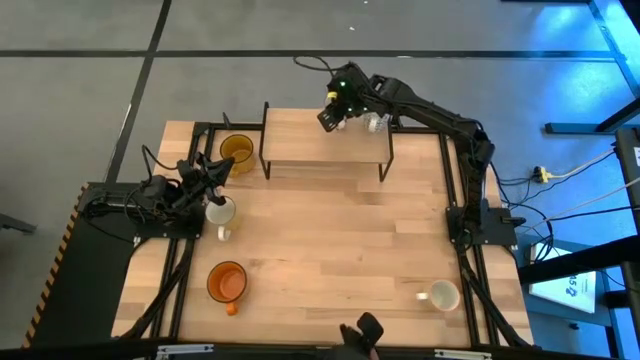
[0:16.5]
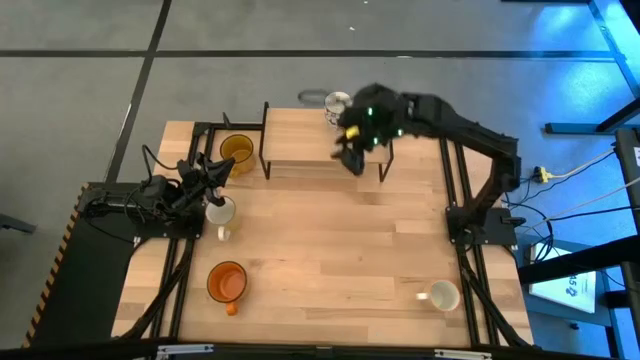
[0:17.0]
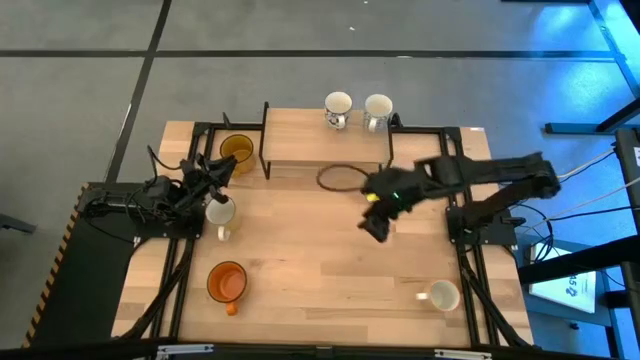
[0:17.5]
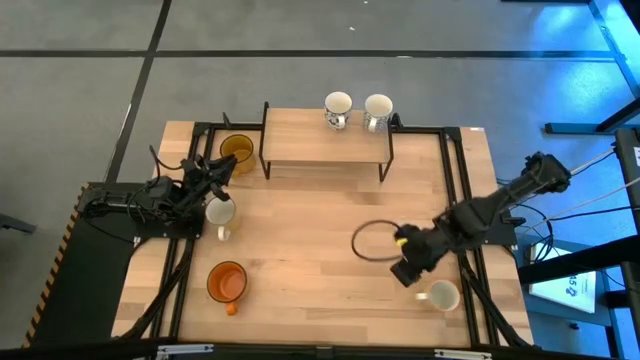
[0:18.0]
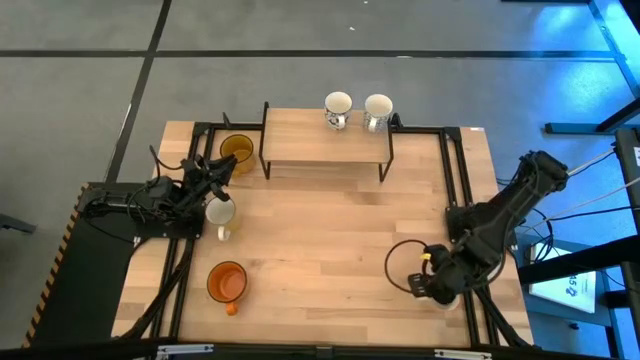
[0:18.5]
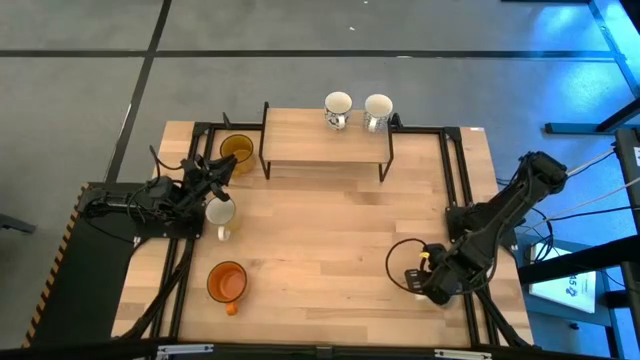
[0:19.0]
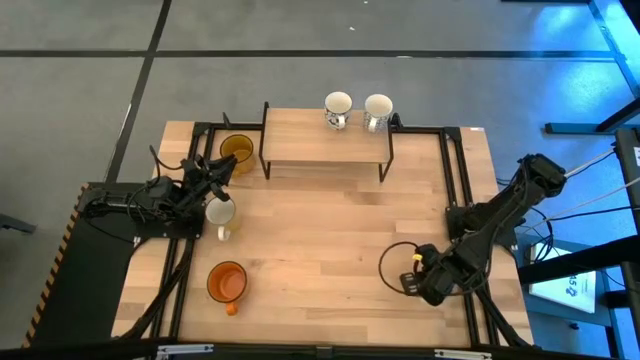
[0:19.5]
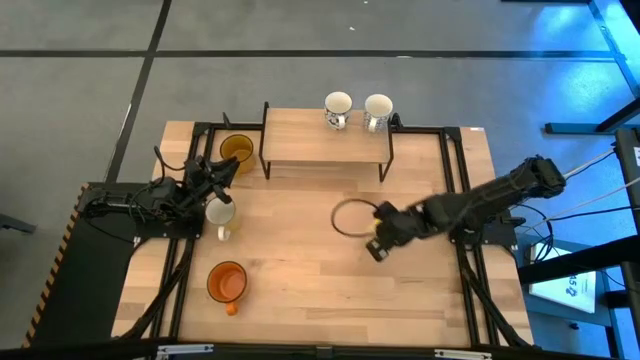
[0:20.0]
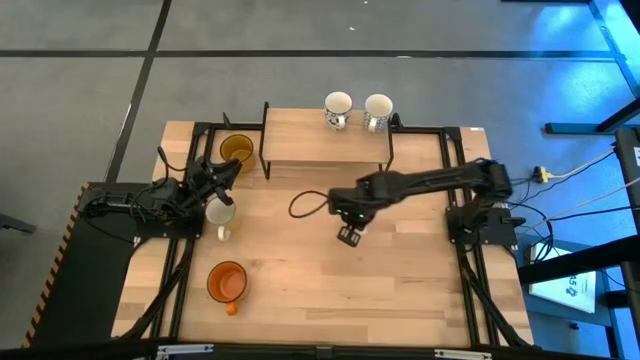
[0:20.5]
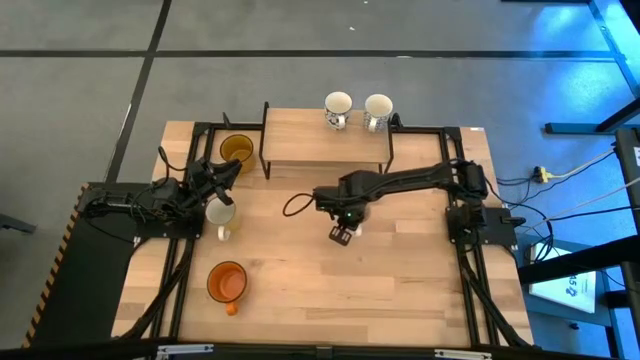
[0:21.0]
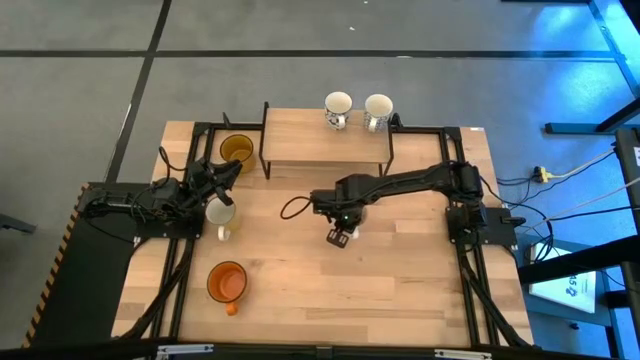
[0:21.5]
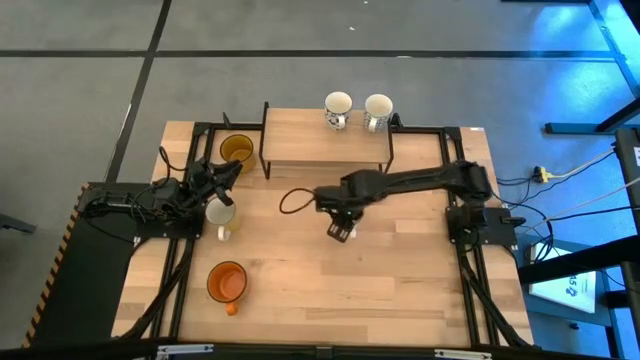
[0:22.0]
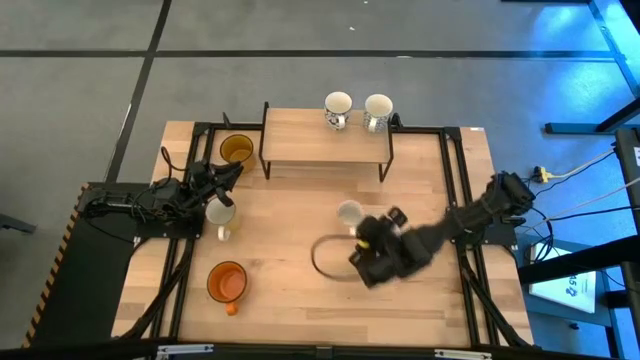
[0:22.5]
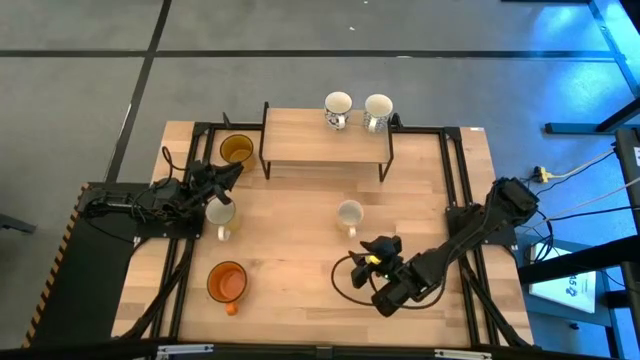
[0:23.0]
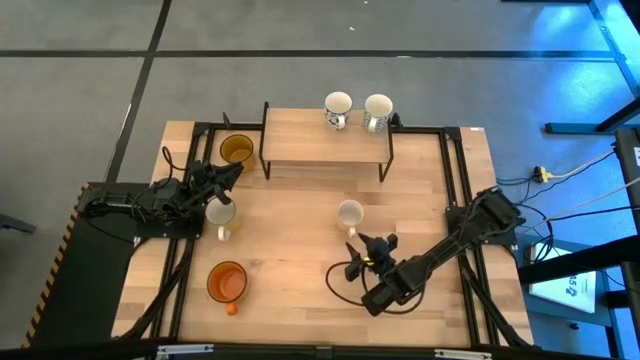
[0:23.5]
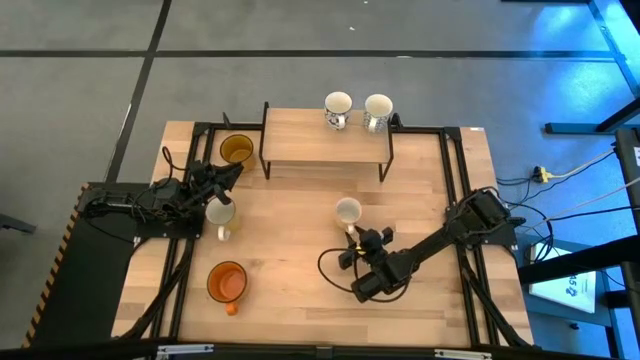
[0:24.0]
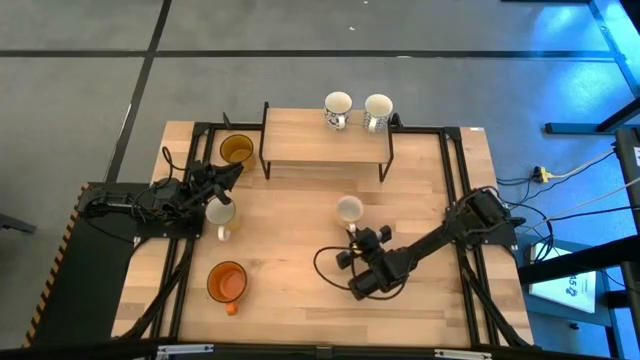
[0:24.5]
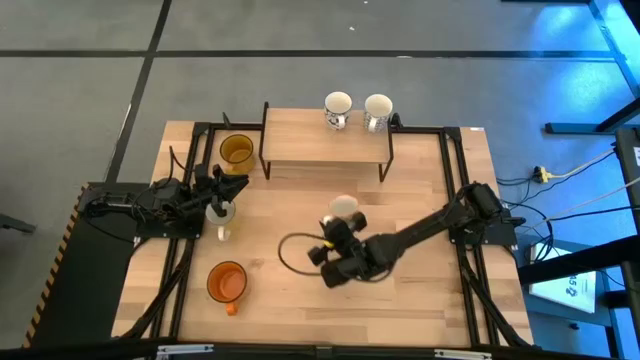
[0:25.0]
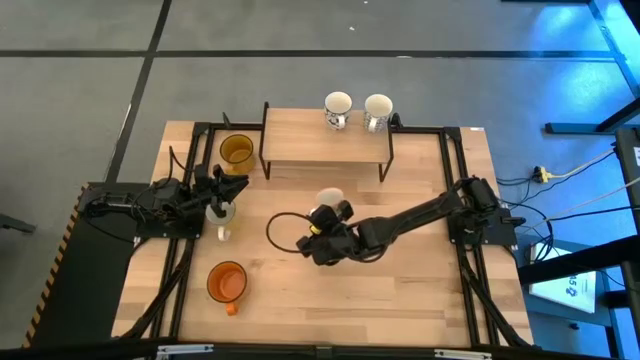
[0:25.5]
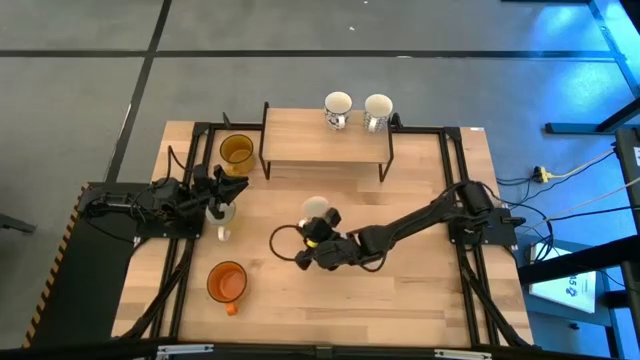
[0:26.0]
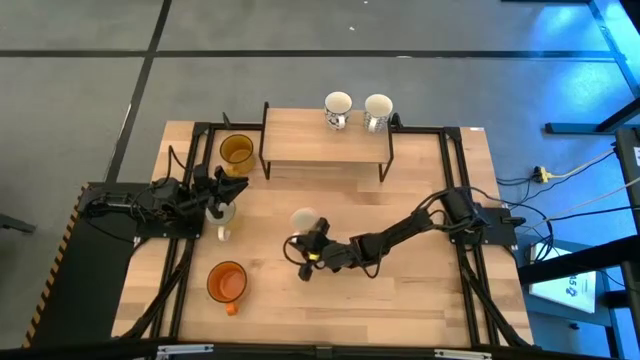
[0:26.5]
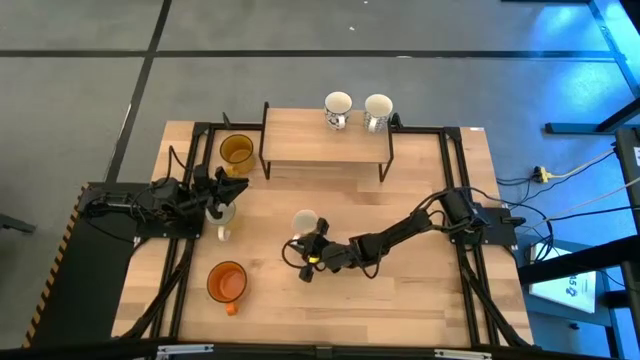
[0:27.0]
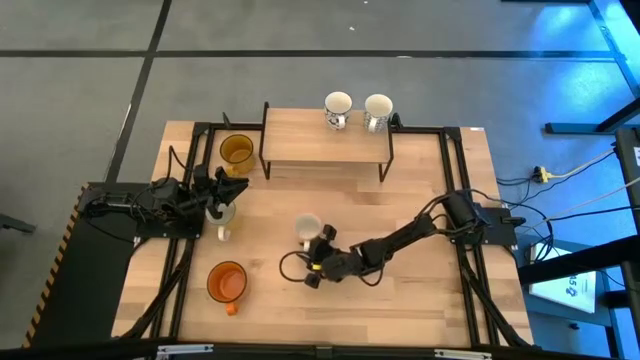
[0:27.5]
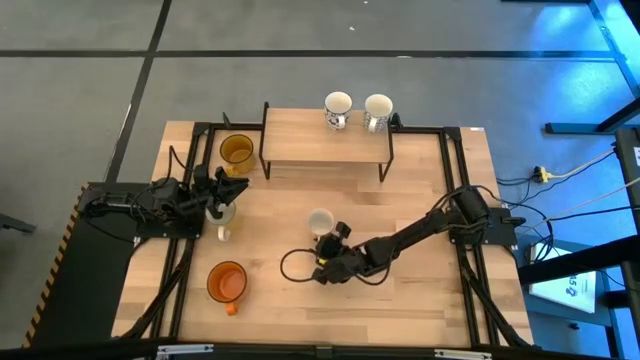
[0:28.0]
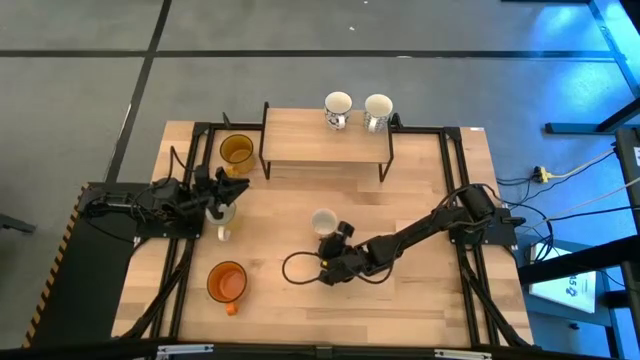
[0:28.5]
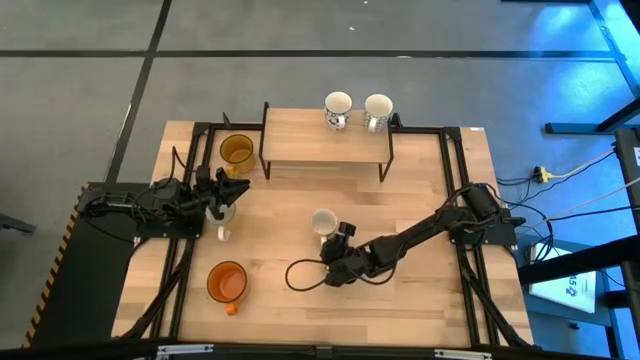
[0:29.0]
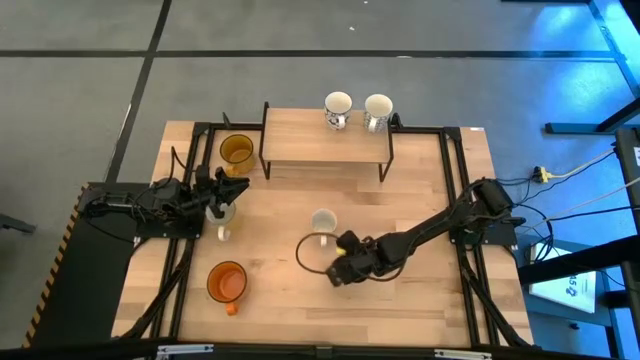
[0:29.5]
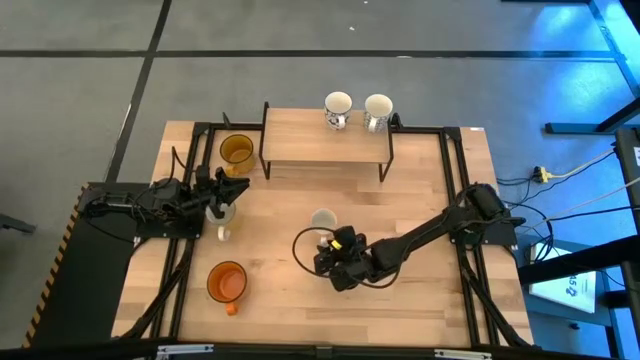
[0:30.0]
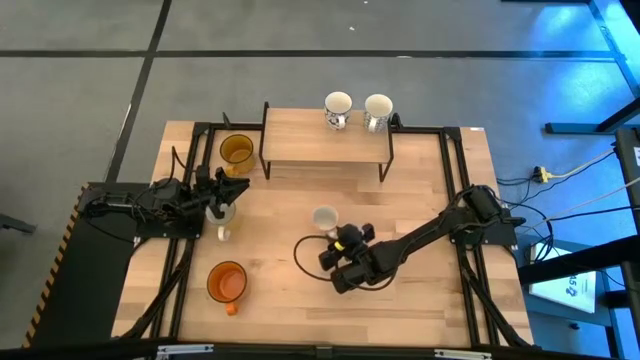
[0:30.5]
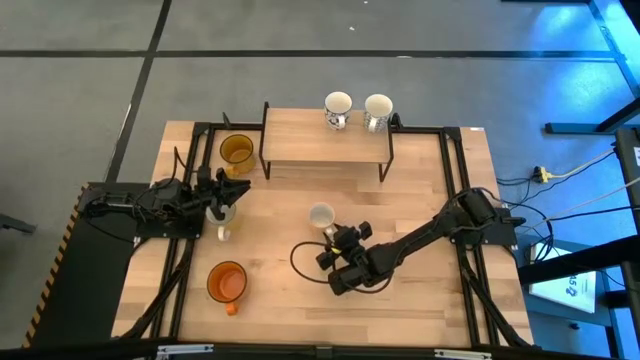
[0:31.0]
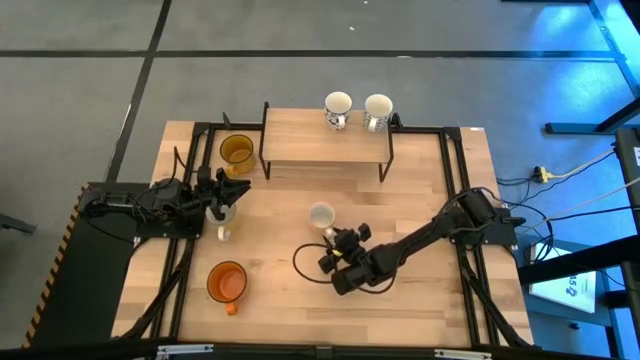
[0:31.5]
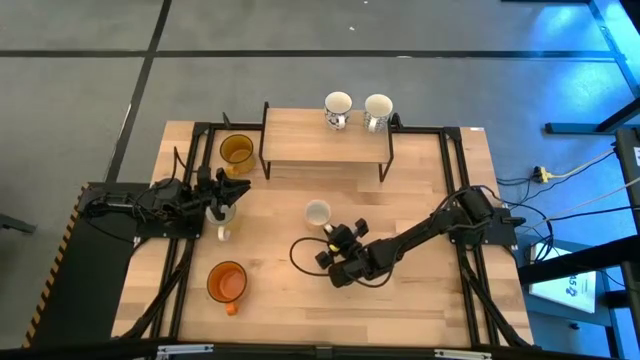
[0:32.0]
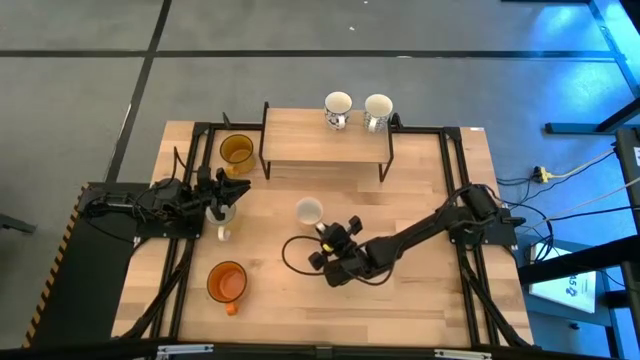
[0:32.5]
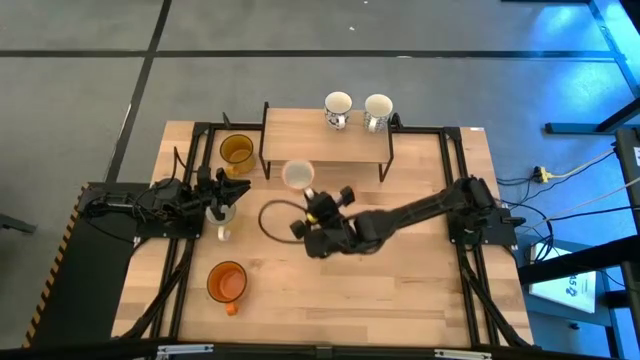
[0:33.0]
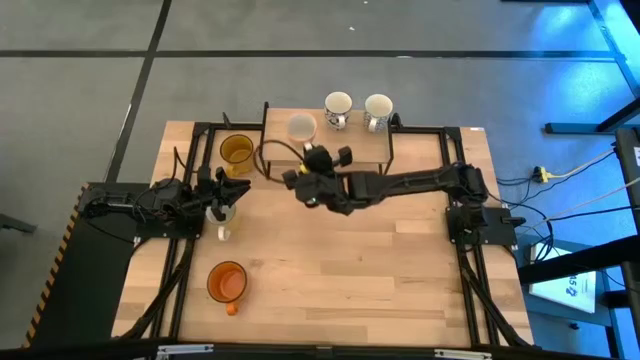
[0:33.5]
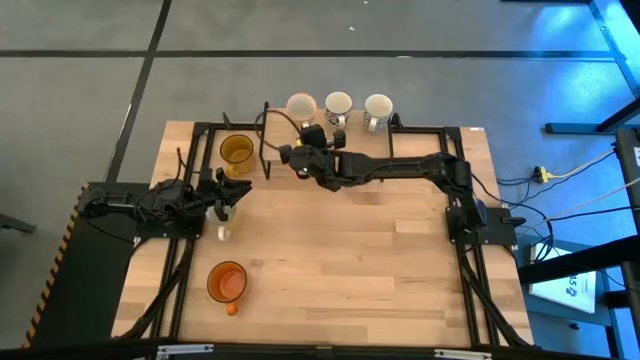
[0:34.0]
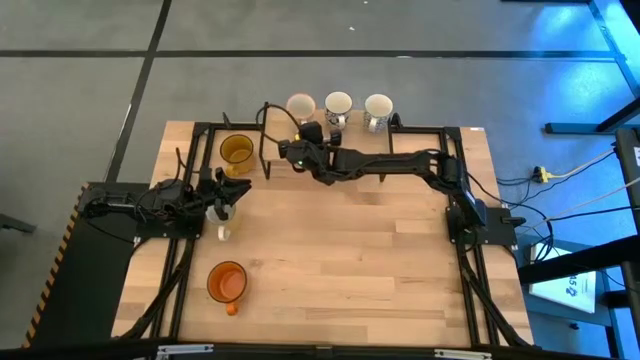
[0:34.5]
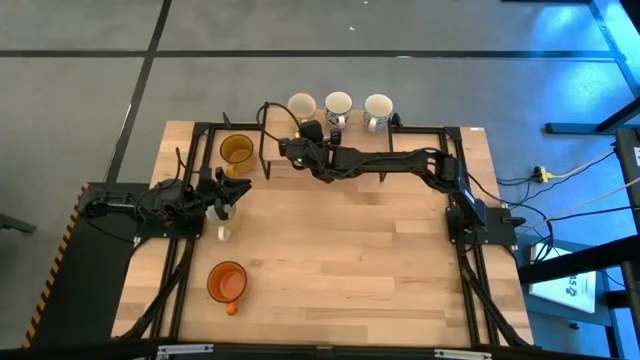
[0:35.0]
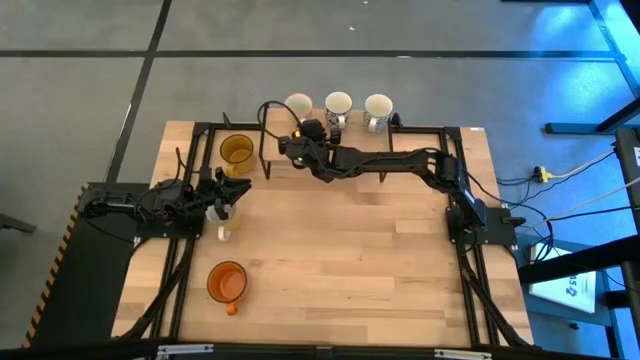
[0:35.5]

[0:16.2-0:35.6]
Task: Place coffee mugs
Put the yellow patterned mug on the shelf

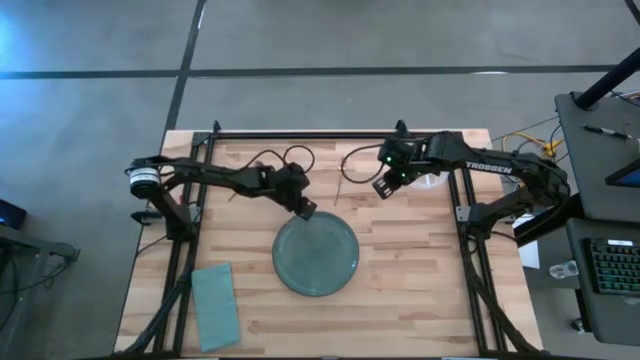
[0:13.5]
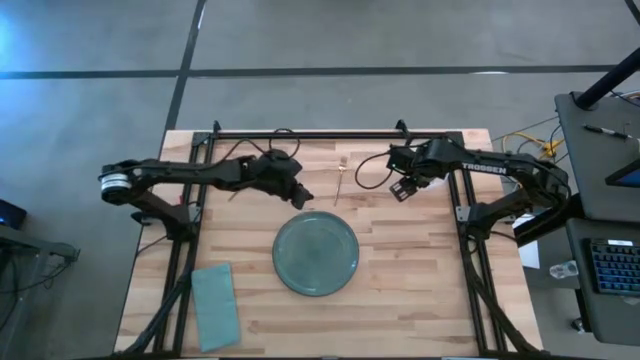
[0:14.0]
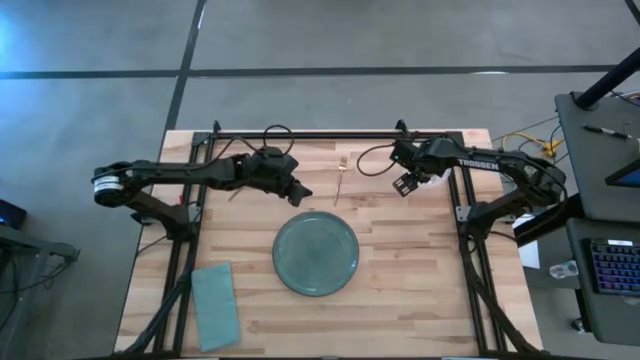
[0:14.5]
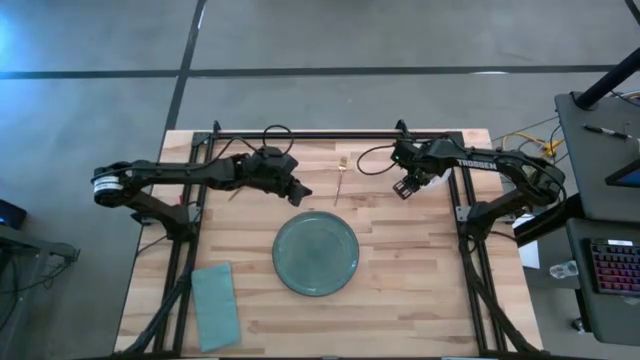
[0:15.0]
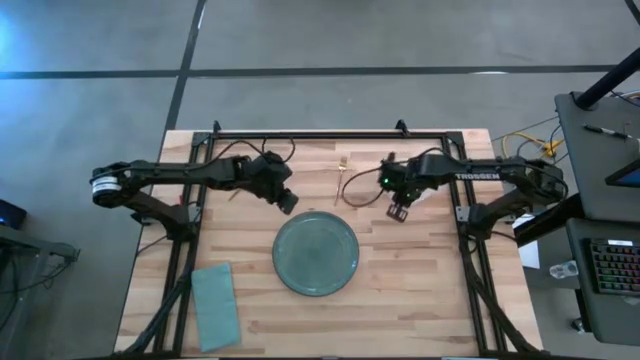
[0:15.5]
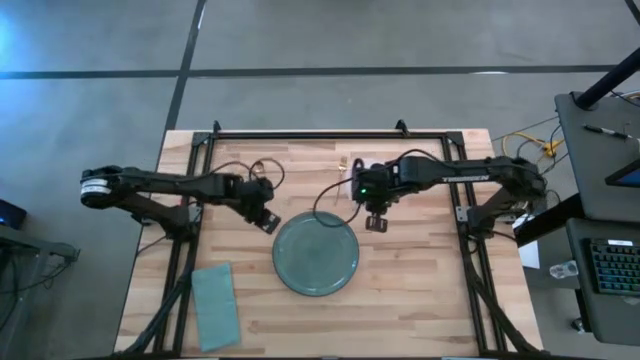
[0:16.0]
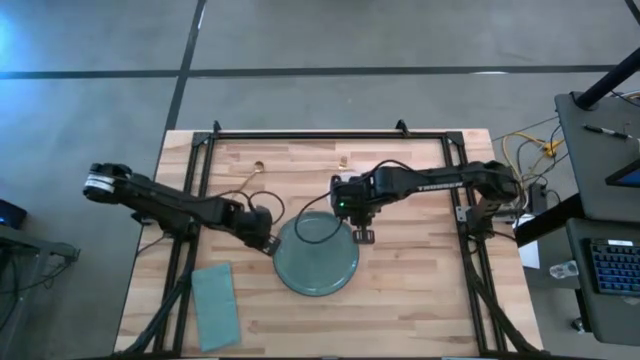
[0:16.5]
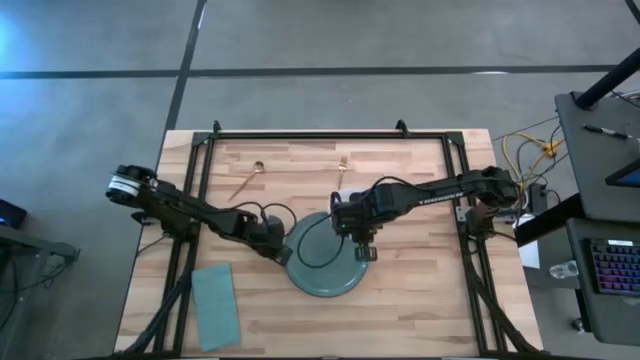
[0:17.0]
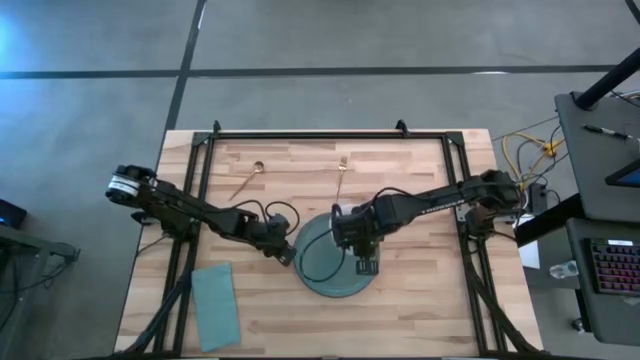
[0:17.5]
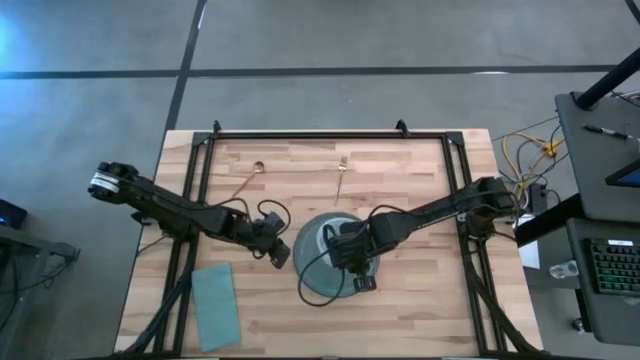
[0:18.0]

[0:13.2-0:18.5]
Task: Set table place
Put the transparent bowl on the plate
